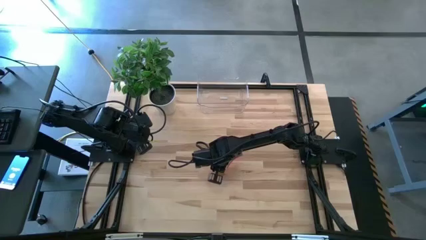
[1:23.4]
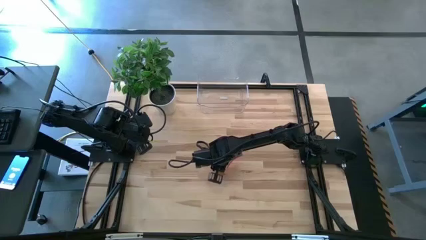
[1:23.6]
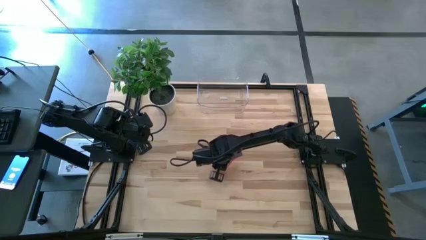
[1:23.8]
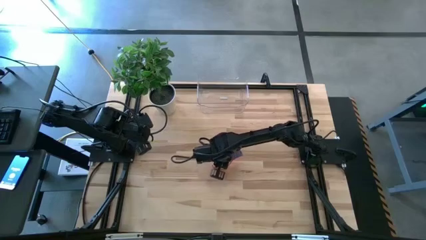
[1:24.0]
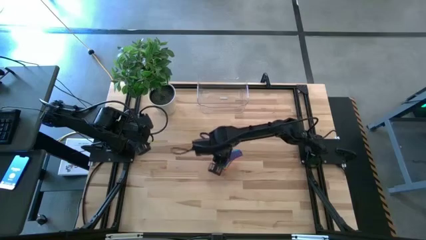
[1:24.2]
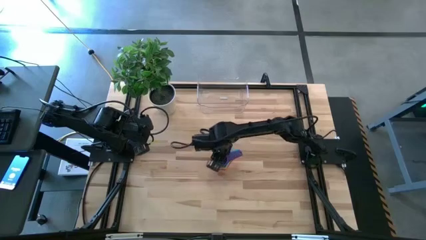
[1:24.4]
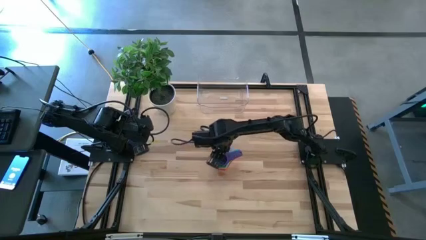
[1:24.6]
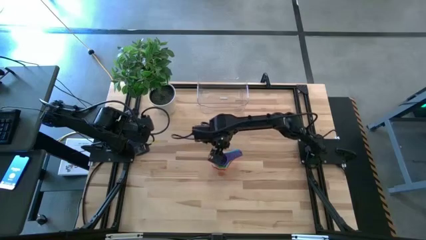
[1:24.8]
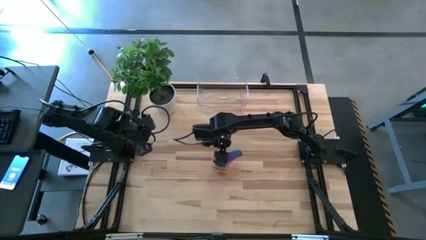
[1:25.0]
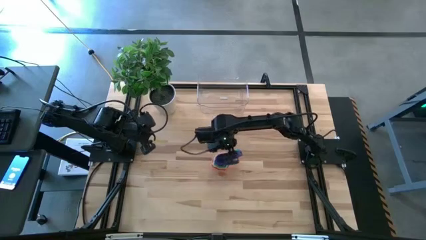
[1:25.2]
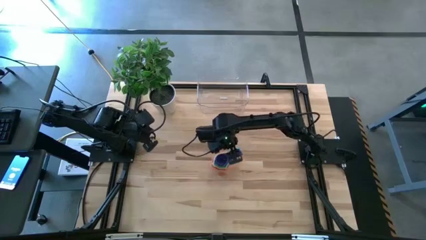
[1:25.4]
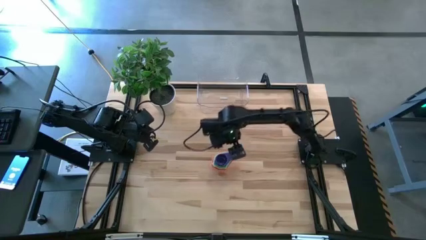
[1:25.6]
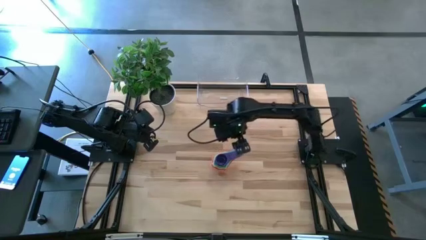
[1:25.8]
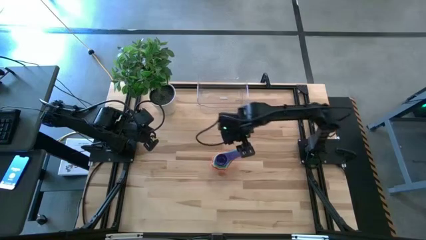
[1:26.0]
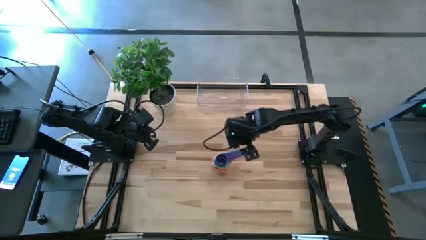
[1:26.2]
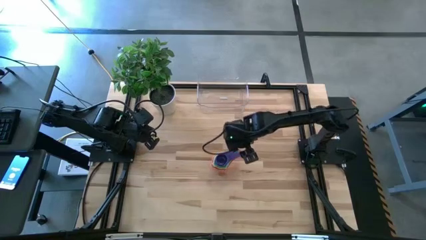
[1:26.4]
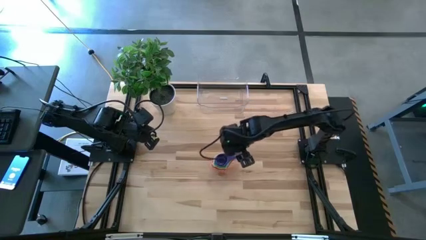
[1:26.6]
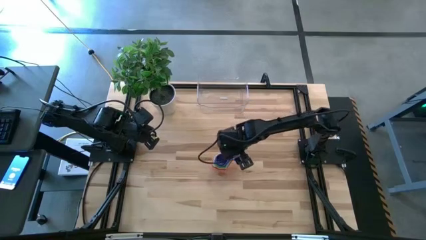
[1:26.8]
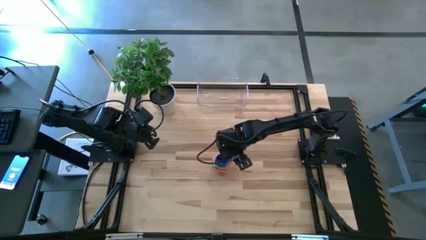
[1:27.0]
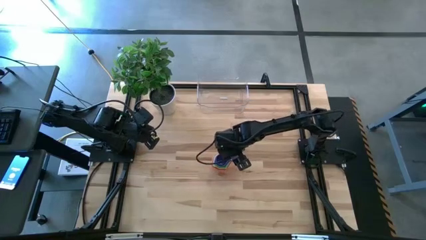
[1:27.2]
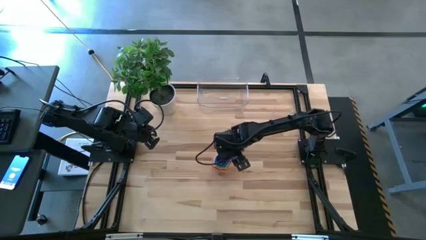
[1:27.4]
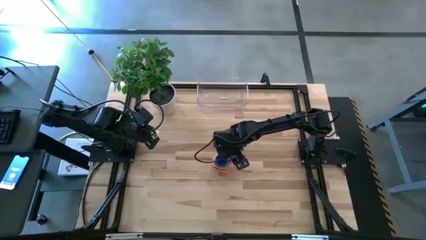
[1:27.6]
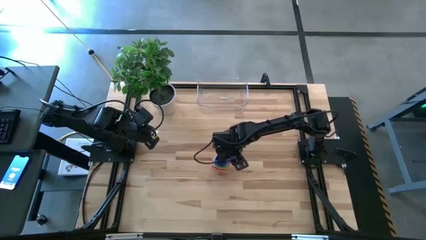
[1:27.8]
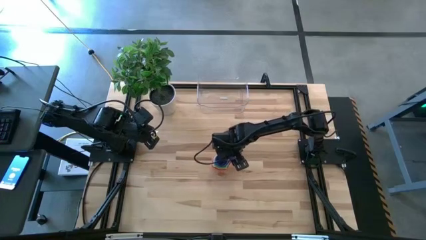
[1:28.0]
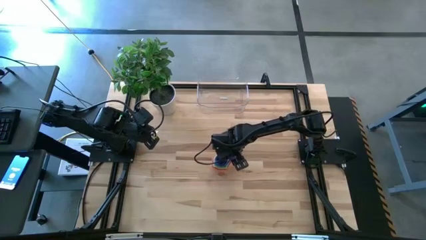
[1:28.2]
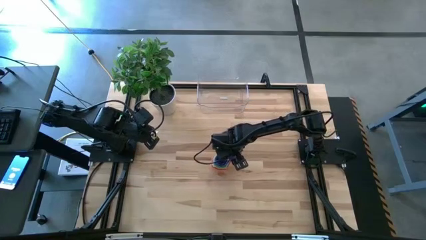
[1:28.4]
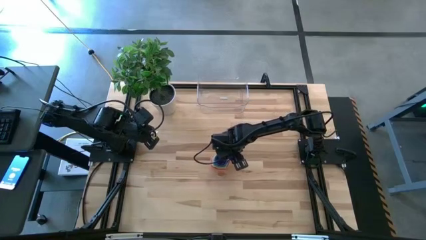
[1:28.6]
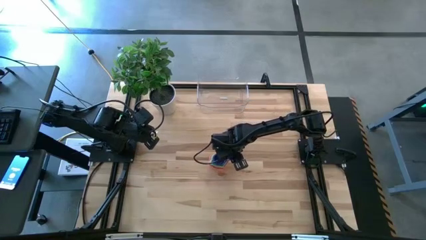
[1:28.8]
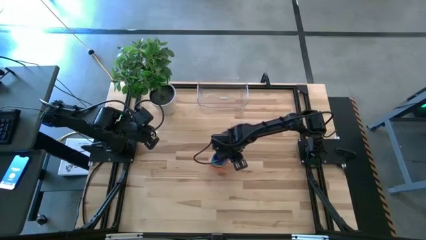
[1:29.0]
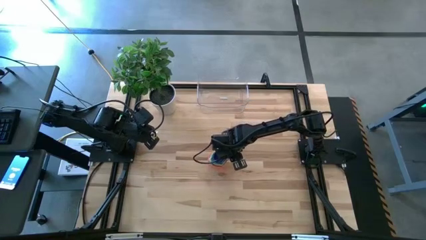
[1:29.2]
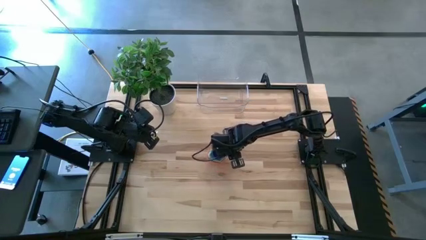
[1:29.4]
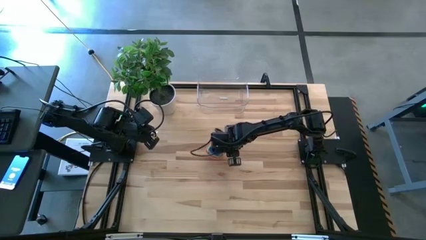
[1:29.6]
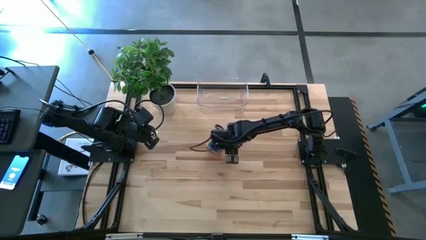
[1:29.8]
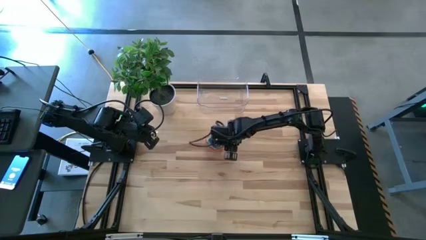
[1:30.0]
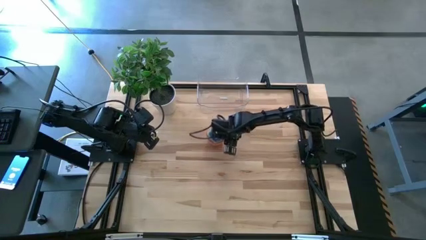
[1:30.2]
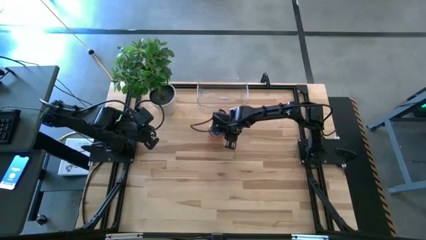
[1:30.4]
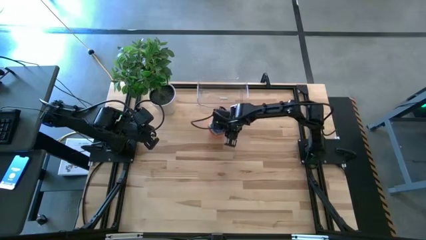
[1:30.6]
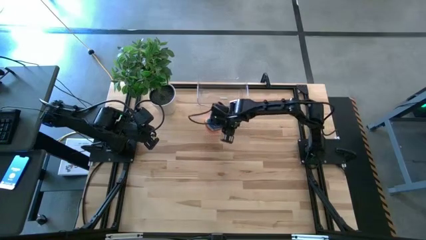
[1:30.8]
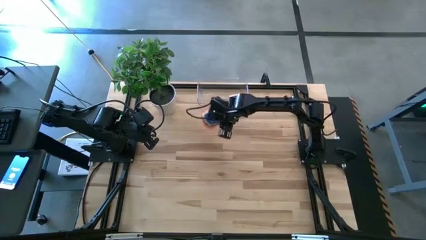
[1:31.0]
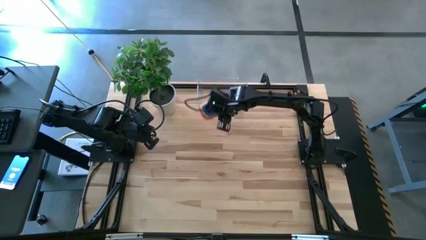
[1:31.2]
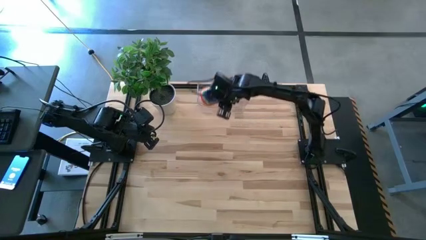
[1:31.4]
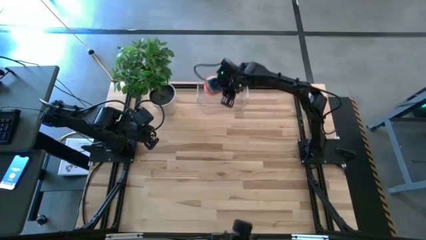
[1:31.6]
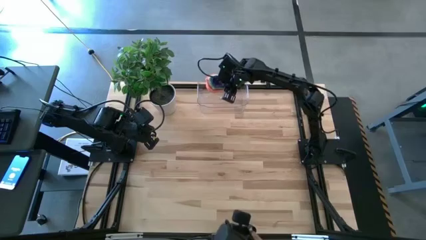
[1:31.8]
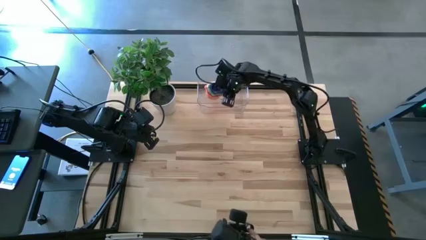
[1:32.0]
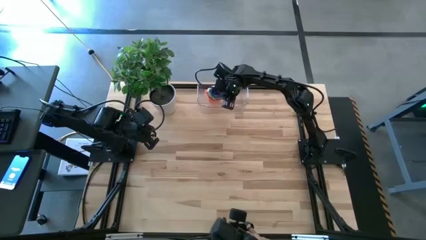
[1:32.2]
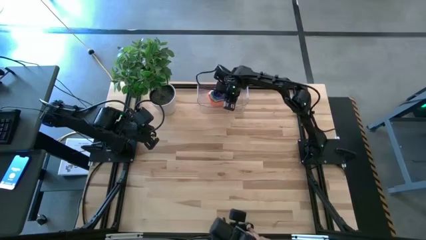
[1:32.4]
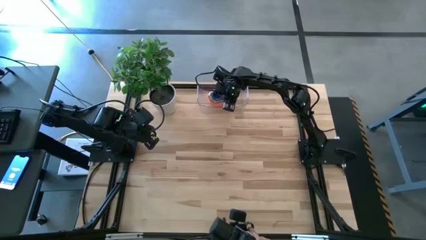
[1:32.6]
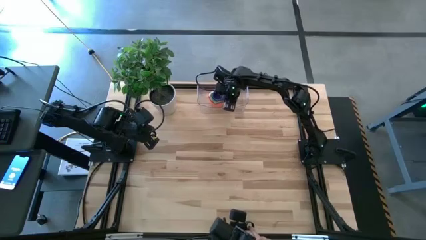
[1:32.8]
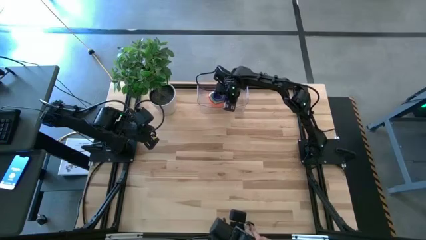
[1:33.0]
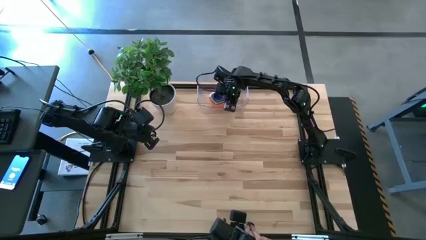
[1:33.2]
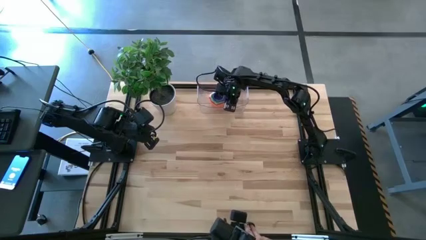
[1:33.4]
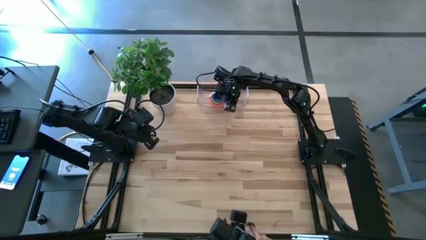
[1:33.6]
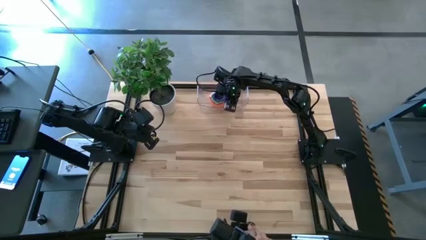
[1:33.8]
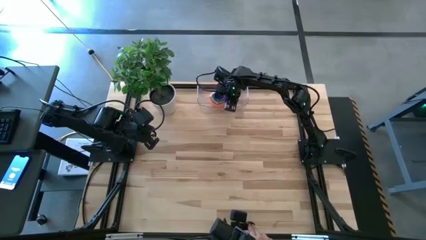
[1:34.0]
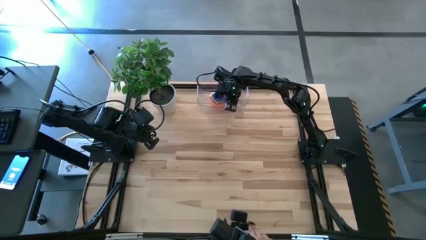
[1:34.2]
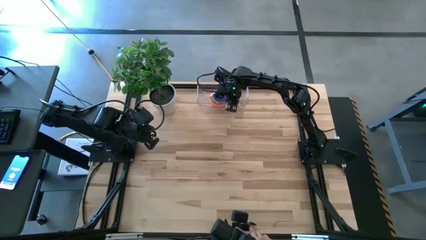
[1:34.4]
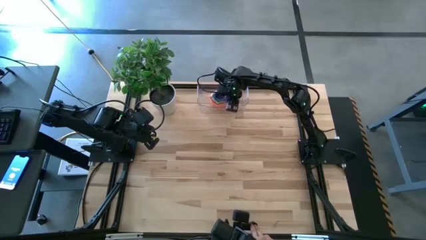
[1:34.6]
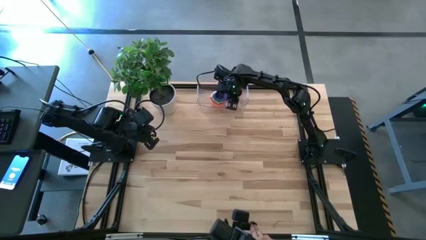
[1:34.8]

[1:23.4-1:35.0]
Task: Nest measuring cups in basket
Put the nested measuring cups into the transparent bin

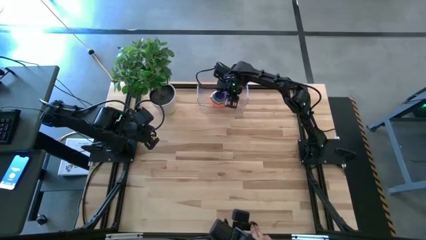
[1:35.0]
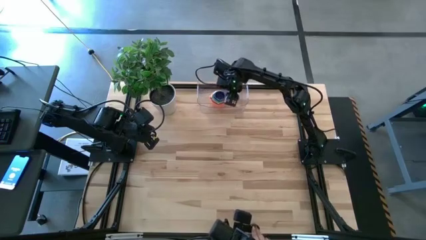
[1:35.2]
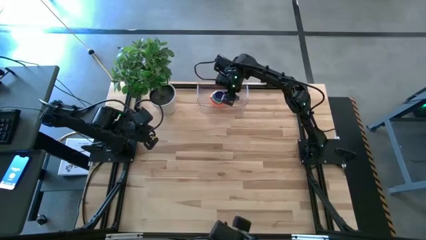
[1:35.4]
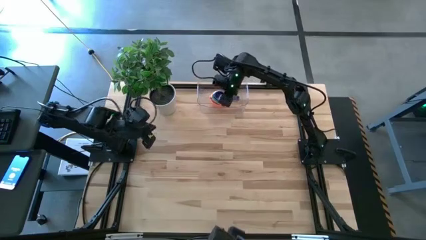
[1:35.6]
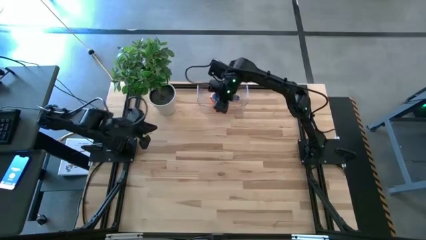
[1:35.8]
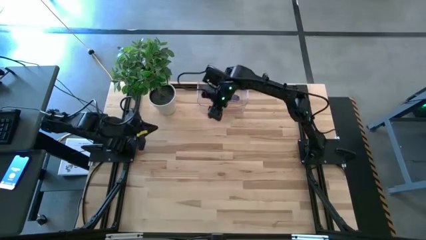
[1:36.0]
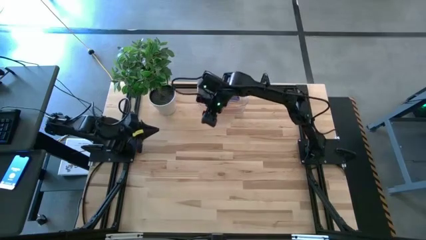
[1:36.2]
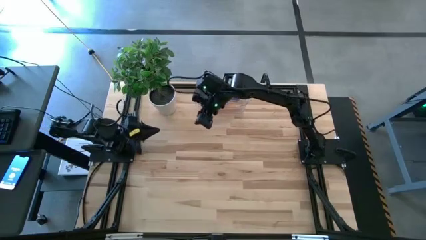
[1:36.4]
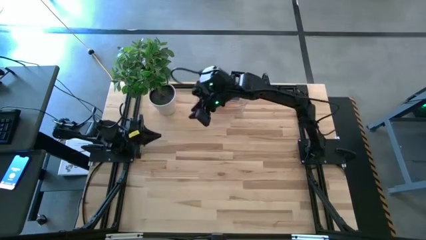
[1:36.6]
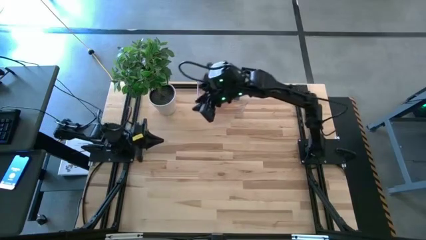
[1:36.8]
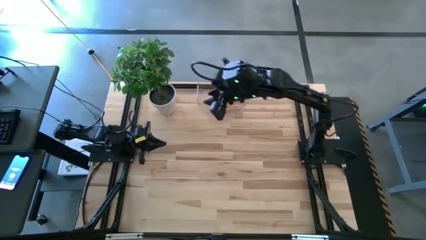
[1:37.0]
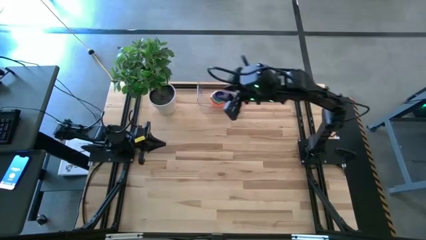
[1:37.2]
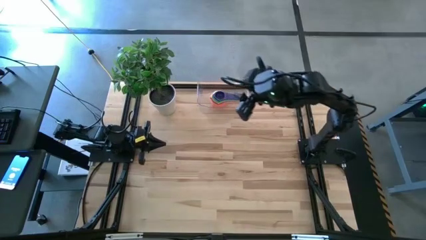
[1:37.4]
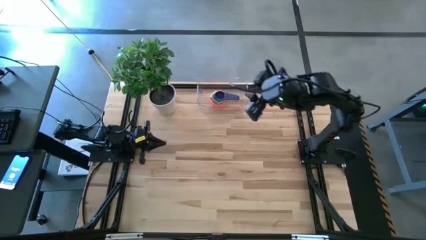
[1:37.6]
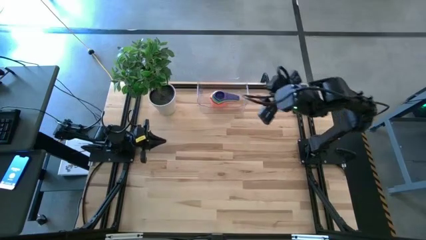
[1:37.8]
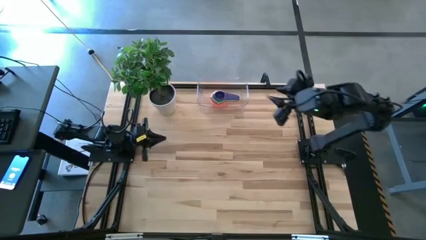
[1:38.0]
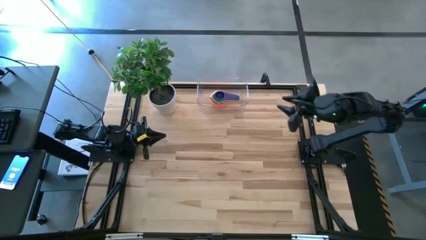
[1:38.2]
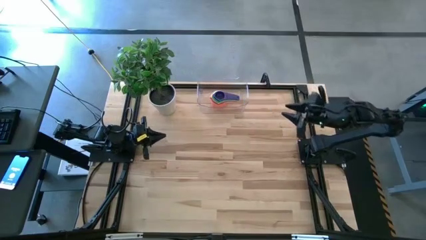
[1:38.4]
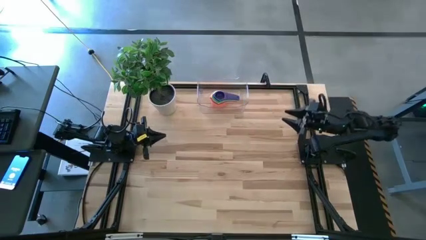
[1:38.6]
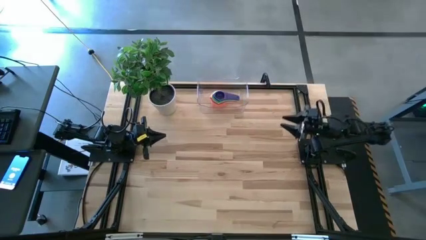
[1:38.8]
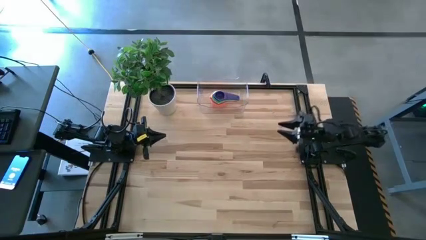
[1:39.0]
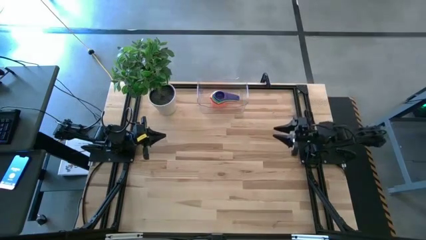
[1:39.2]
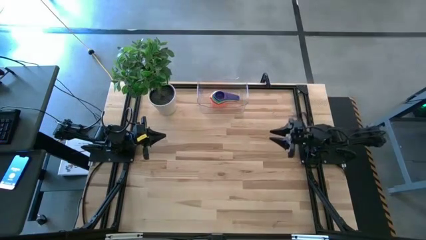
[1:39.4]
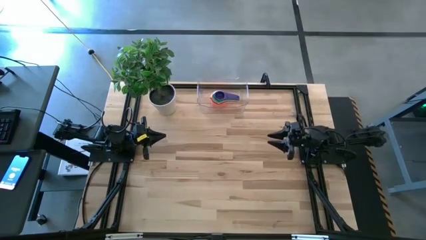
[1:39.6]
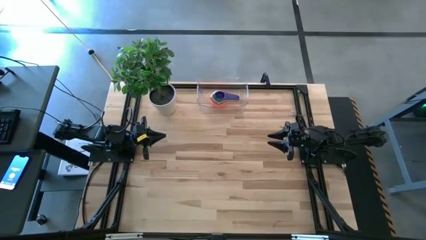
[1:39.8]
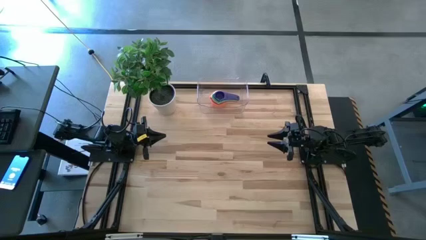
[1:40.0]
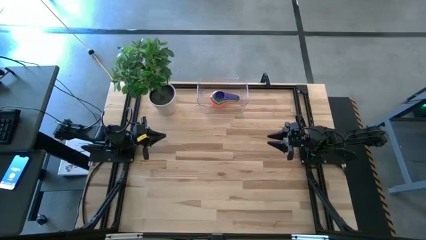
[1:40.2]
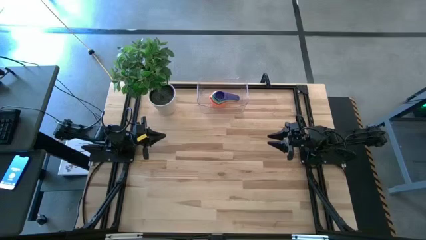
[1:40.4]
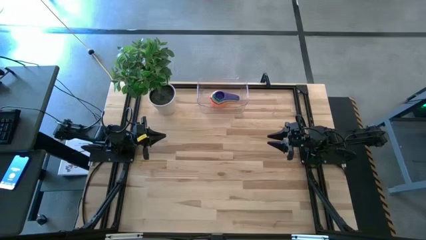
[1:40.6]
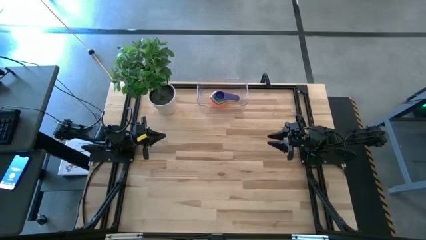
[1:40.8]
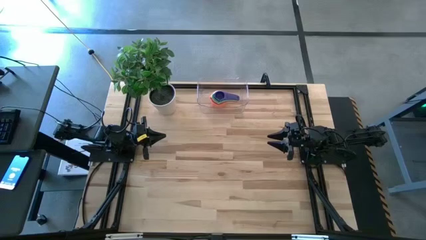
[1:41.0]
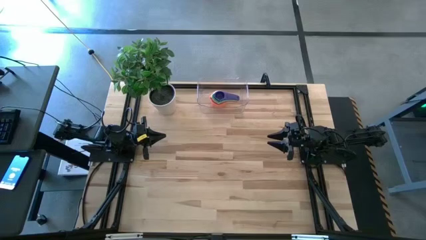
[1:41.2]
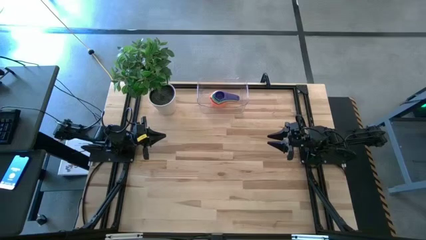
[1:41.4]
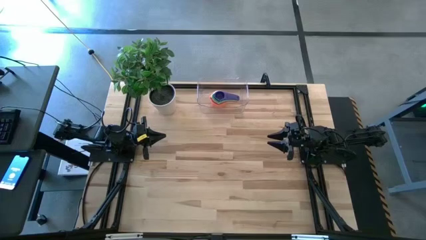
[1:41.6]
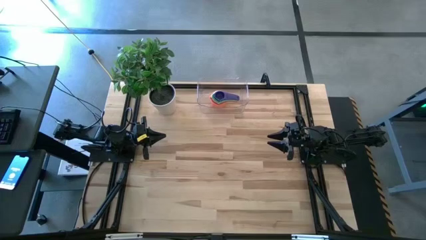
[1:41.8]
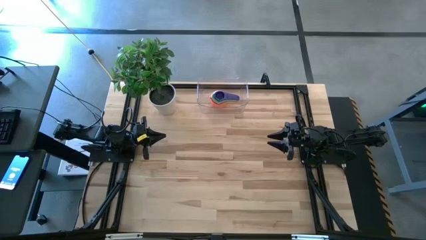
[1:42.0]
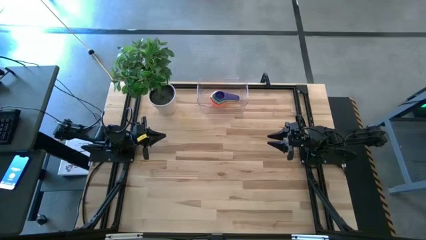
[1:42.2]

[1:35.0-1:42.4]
Return to Home Position
